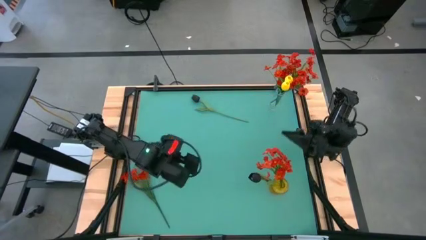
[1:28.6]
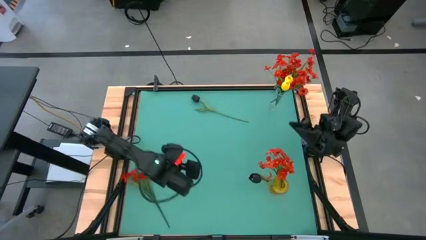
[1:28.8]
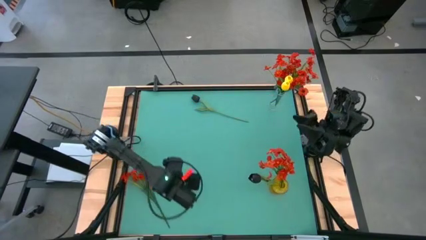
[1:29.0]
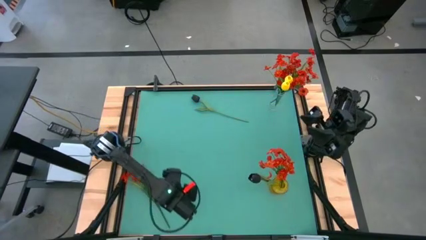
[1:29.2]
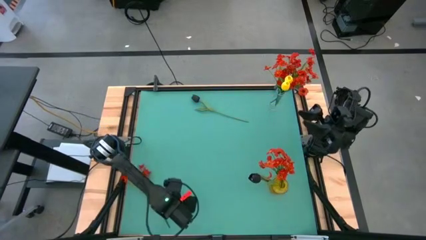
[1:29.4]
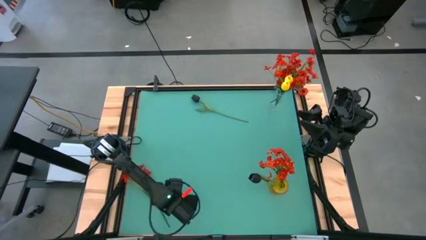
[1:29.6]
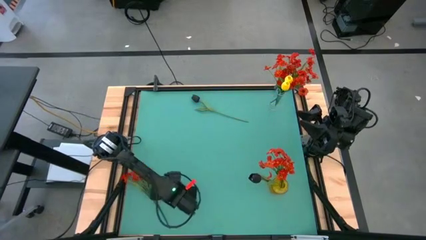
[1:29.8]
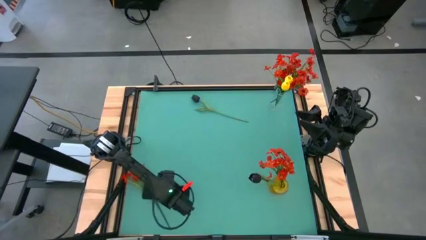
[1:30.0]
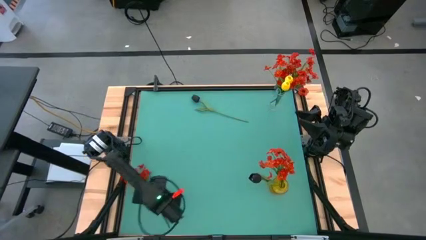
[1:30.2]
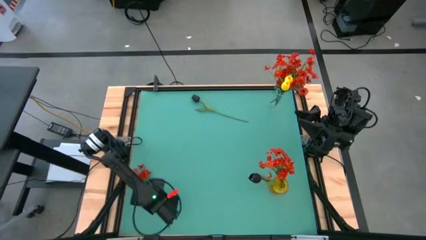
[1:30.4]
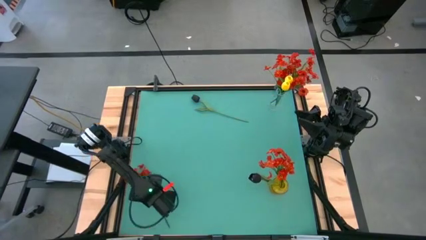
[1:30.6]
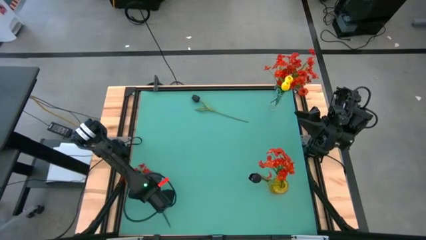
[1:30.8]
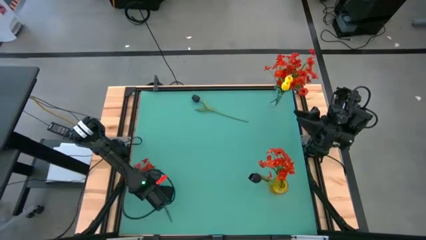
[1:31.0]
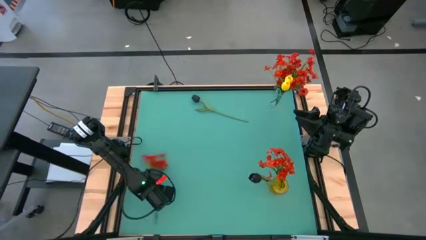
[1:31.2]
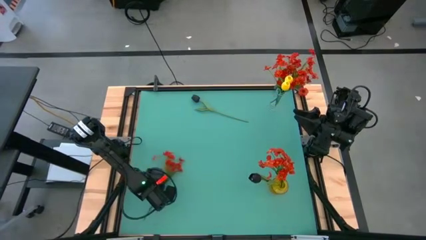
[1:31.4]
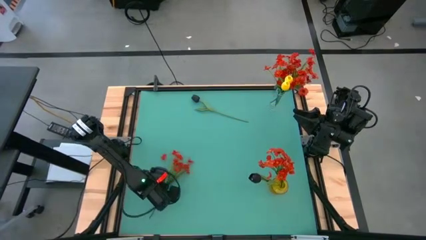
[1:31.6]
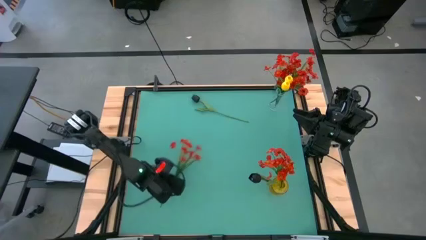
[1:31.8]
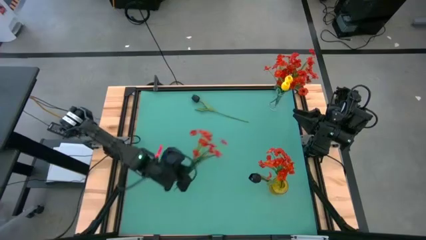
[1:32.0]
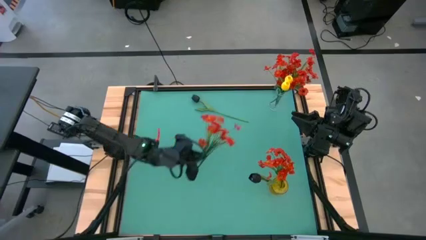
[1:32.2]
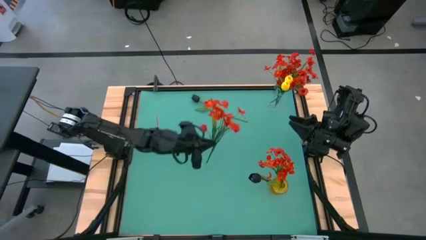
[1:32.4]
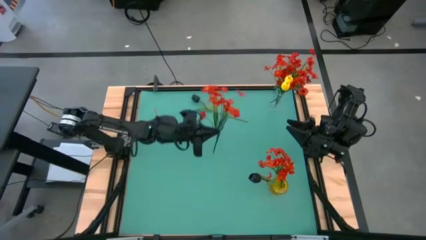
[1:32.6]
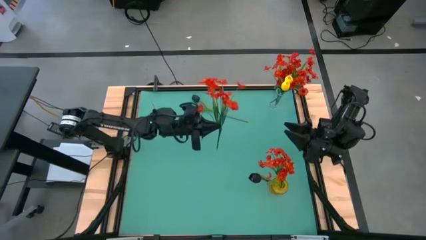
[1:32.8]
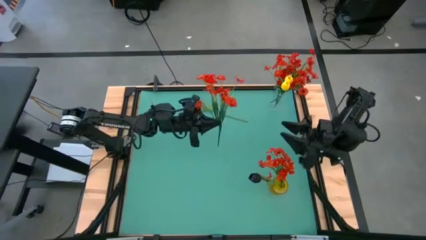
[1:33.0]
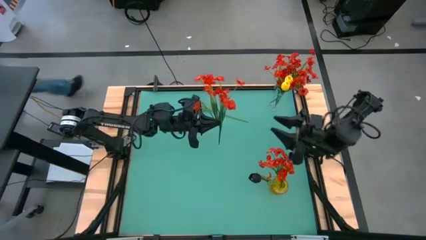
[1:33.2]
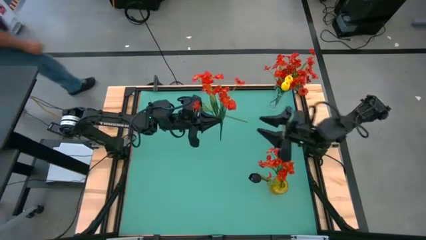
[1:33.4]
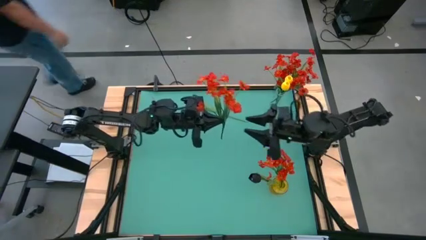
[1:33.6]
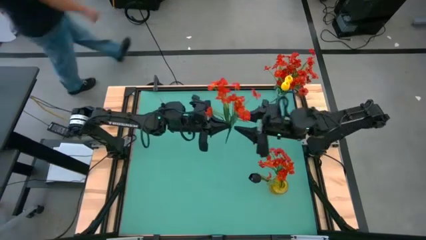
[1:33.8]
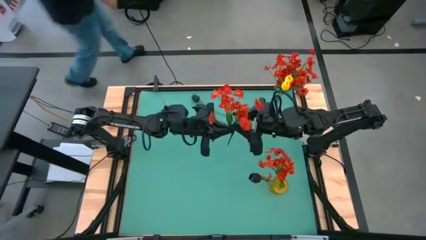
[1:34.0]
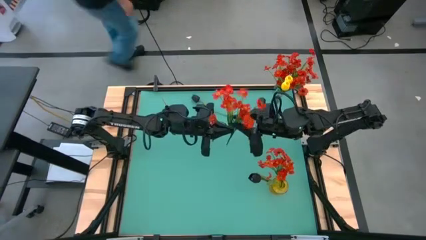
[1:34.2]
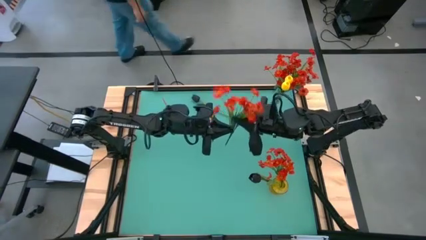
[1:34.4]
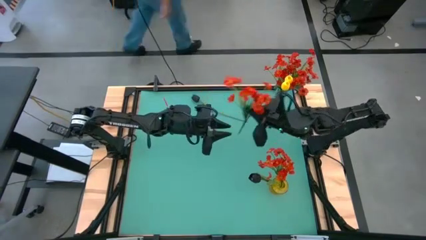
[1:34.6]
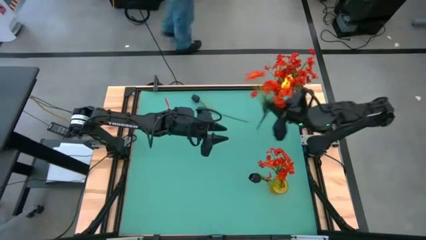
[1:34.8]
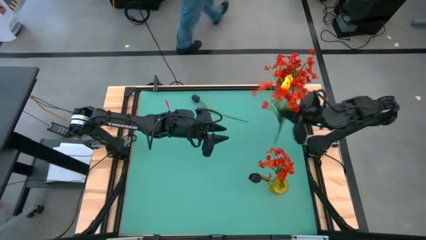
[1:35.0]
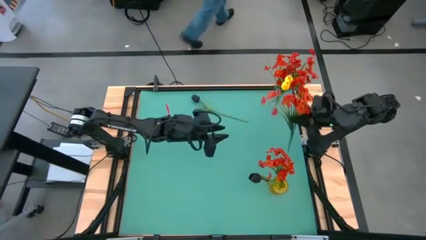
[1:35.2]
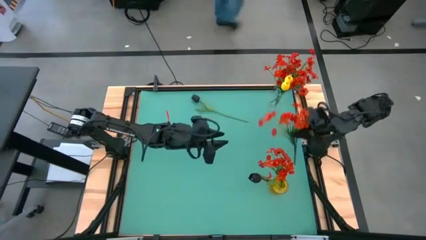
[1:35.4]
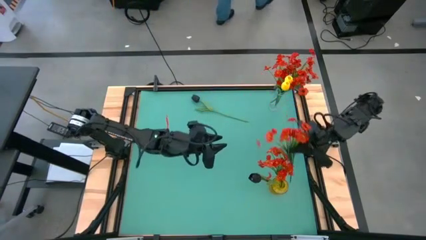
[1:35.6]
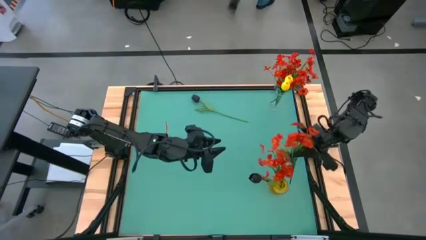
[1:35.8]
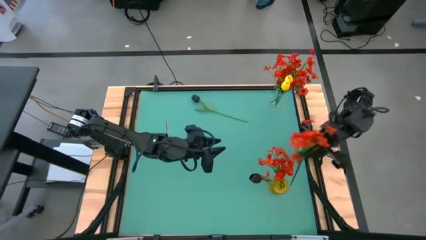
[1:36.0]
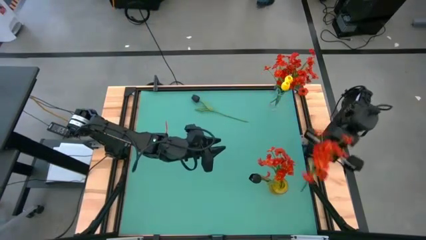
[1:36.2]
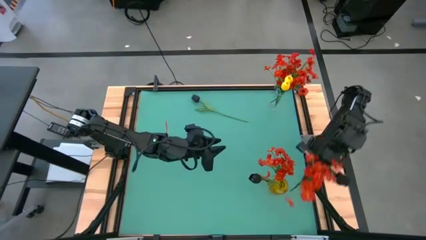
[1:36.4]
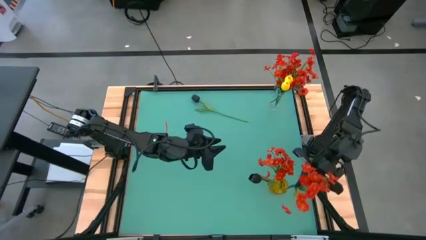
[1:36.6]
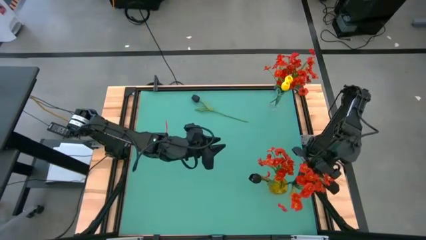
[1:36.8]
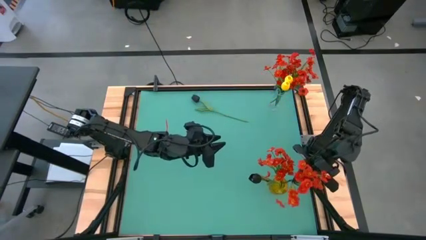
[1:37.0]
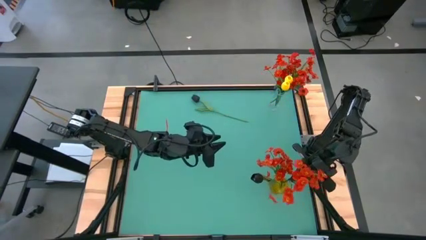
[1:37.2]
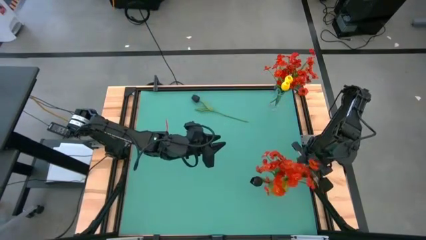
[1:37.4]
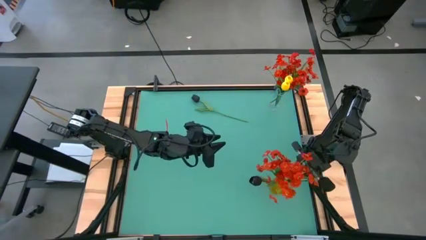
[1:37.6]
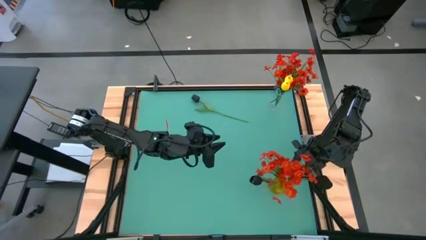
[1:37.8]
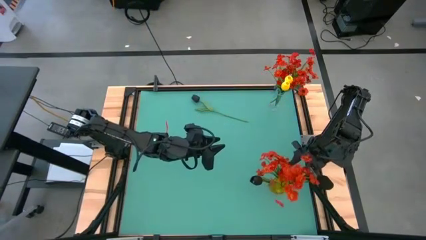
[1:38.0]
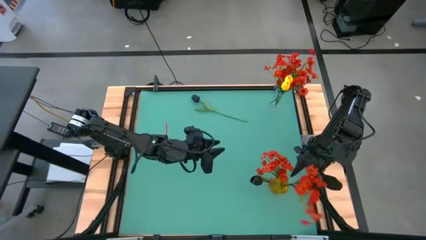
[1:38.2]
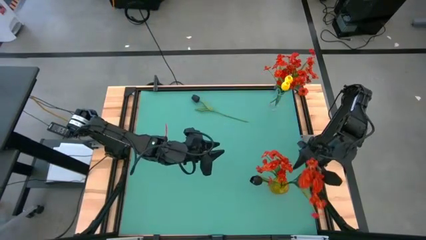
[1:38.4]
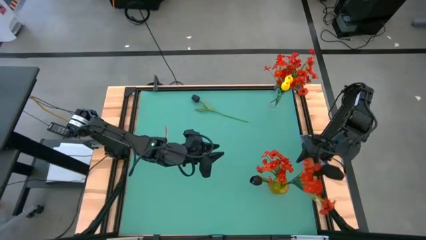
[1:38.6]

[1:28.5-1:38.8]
Task: Sort flowers into vase by color
Put the red flowers into the yellow vase
